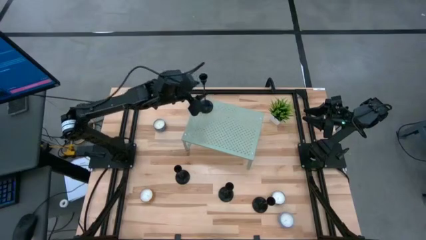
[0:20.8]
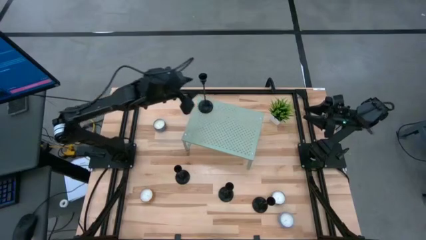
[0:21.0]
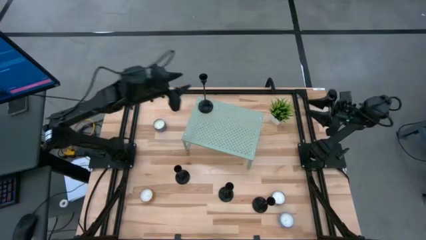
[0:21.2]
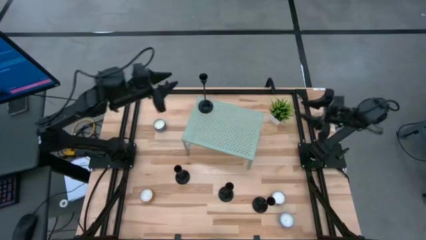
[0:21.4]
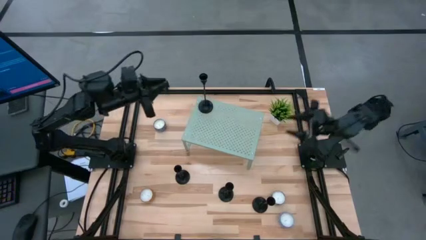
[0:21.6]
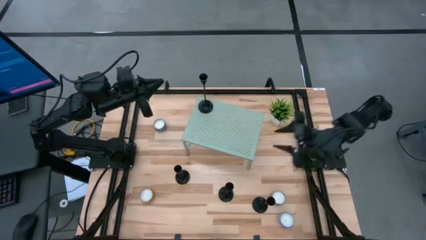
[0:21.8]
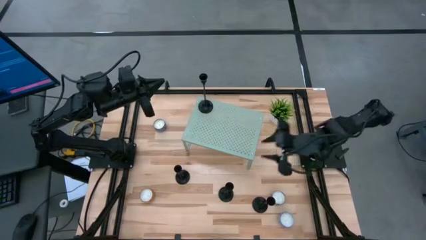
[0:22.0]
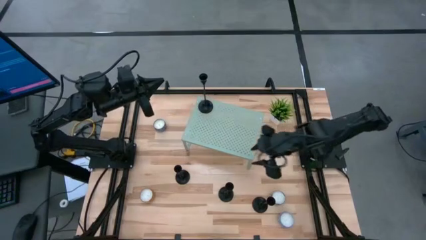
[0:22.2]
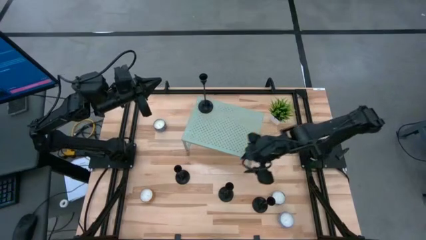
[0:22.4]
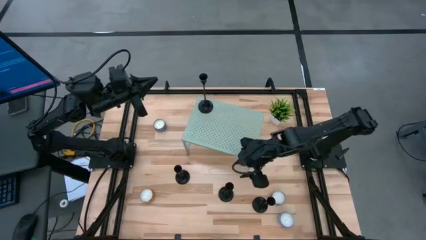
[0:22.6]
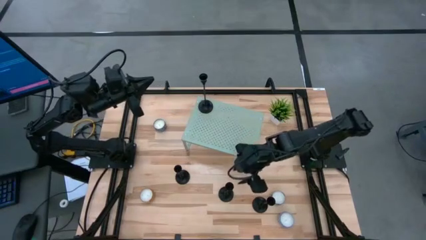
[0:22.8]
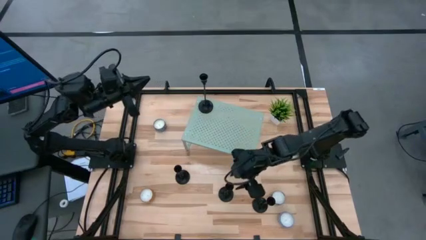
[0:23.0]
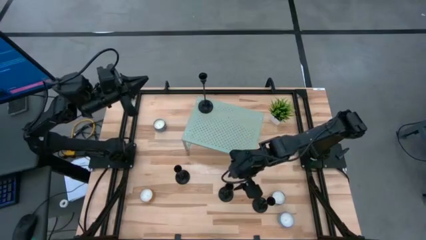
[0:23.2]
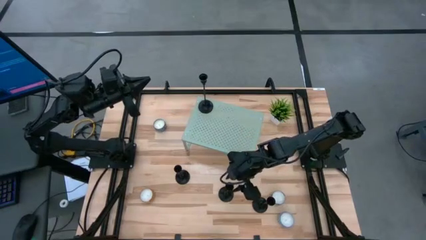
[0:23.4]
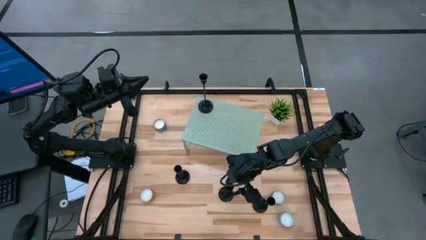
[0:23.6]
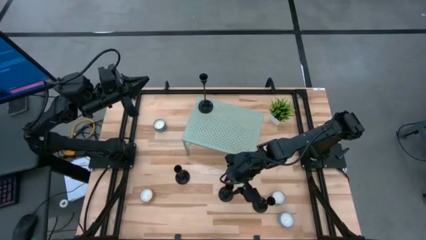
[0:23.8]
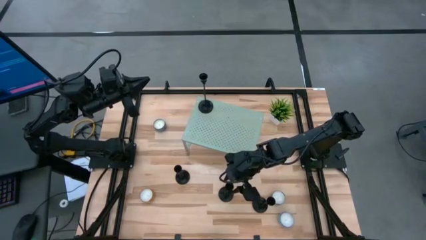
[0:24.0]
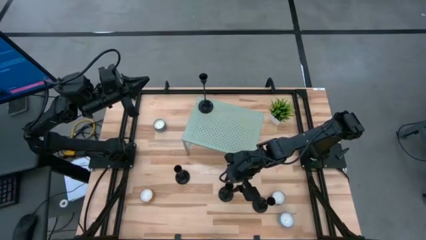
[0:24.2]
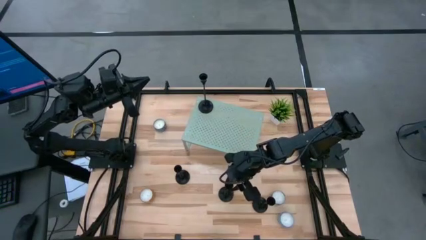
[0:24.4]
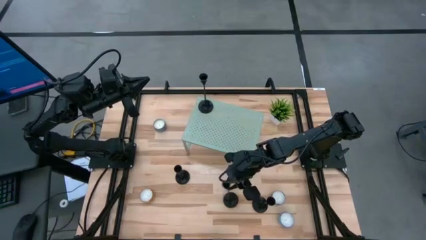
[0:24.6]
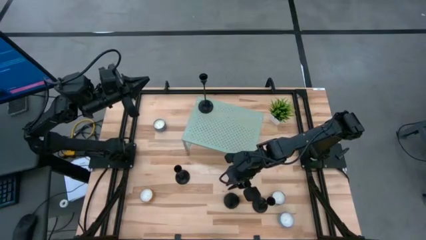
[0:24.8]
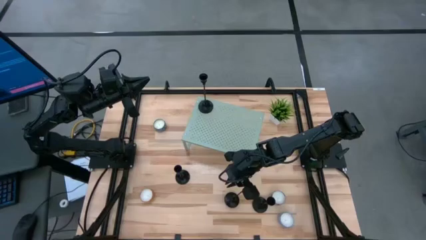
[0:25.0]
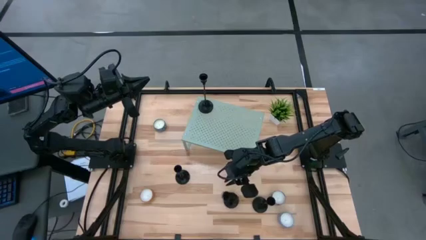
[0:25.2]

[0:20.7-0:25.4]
Task: Pick & Place candle stick holders
Put the black candle holder on the shelf

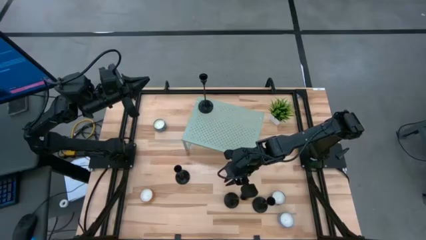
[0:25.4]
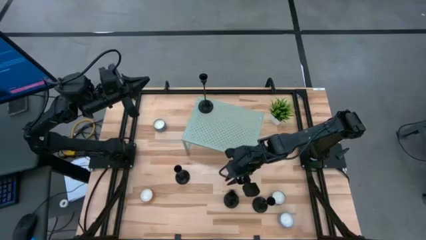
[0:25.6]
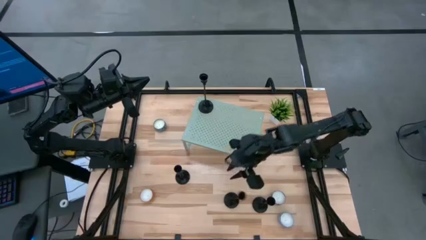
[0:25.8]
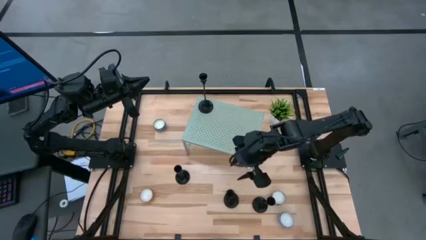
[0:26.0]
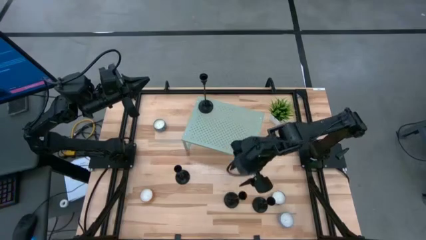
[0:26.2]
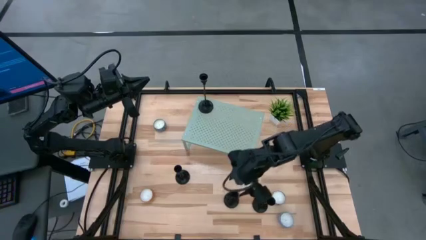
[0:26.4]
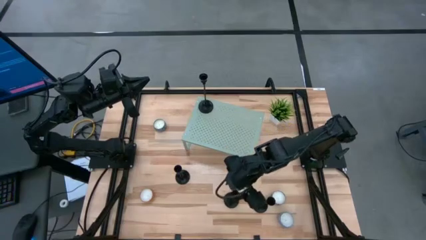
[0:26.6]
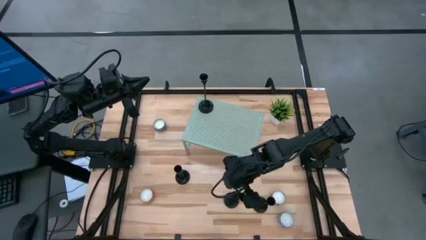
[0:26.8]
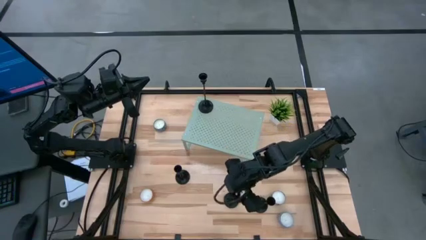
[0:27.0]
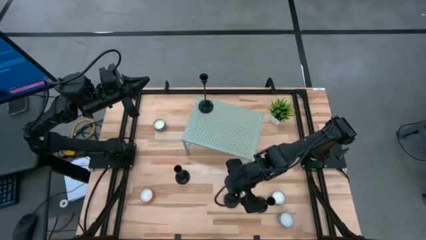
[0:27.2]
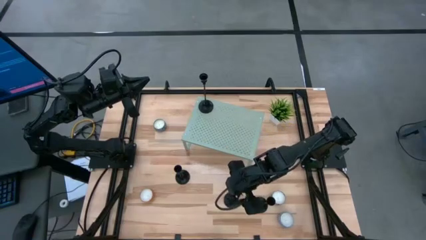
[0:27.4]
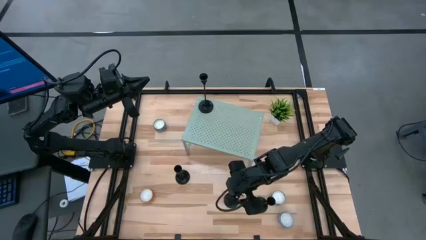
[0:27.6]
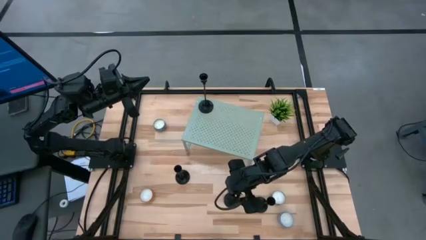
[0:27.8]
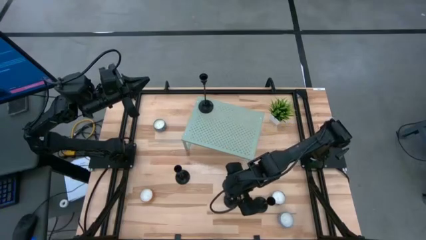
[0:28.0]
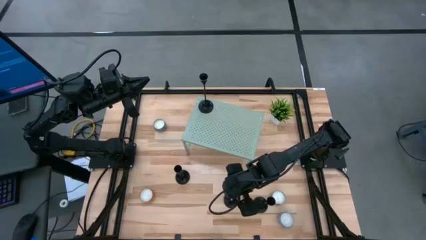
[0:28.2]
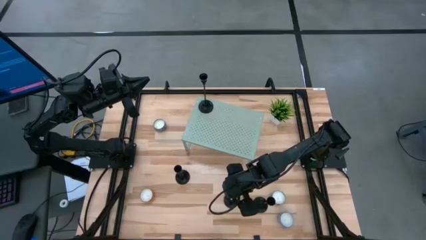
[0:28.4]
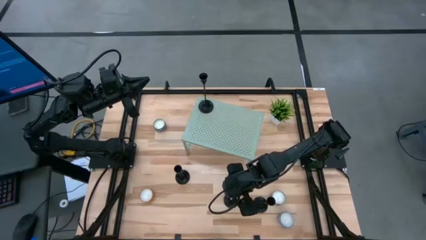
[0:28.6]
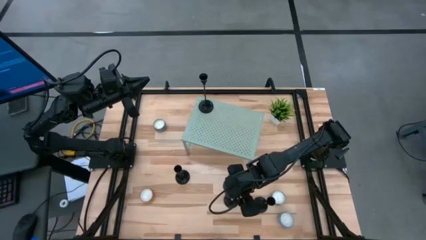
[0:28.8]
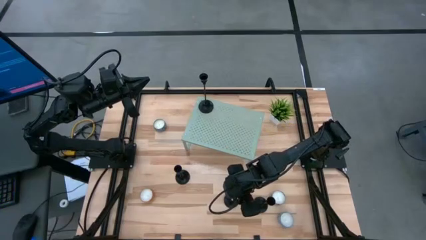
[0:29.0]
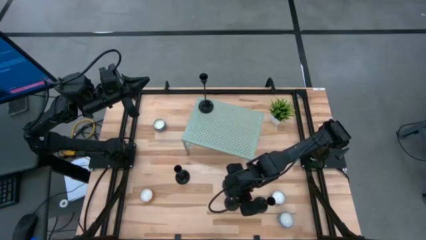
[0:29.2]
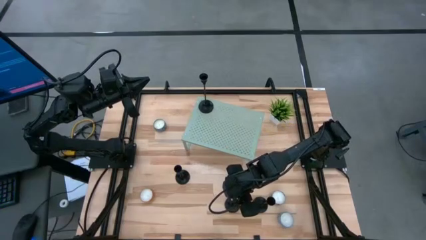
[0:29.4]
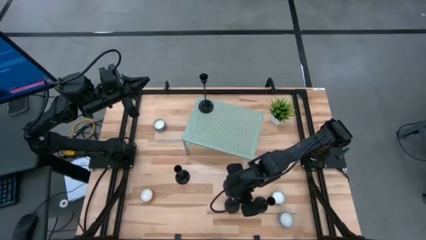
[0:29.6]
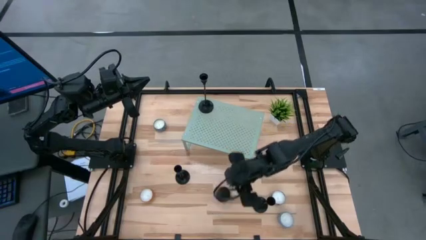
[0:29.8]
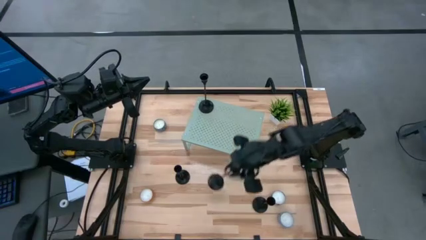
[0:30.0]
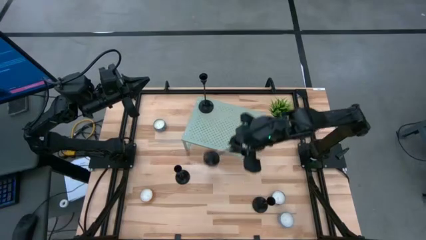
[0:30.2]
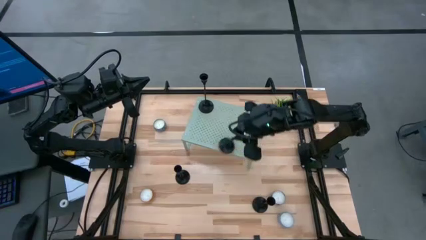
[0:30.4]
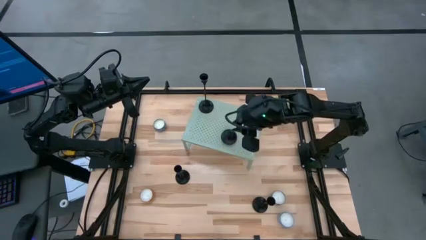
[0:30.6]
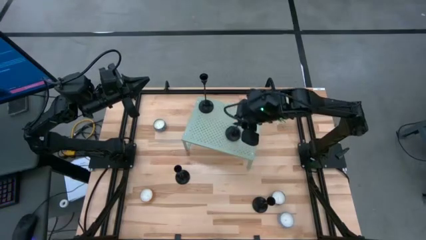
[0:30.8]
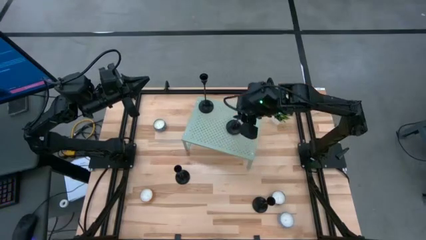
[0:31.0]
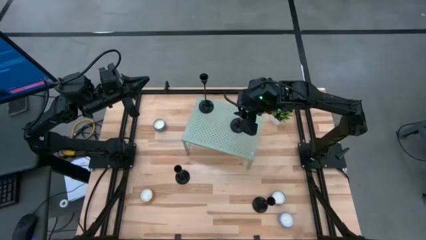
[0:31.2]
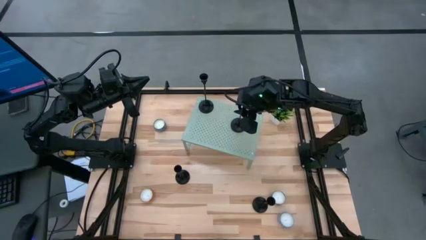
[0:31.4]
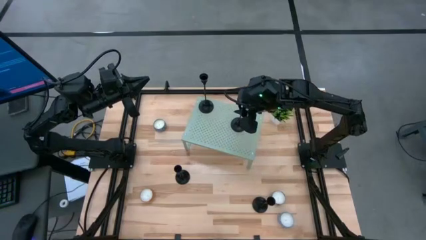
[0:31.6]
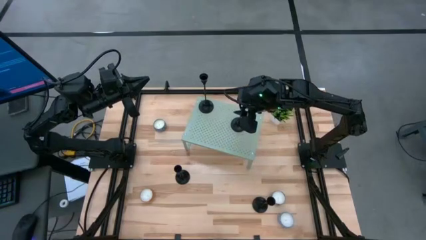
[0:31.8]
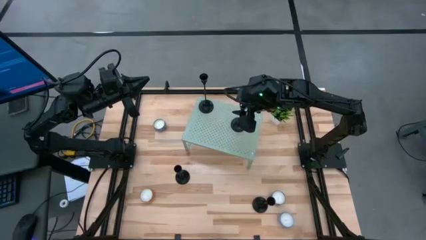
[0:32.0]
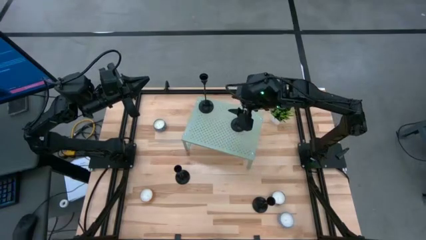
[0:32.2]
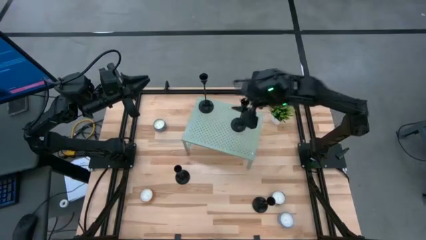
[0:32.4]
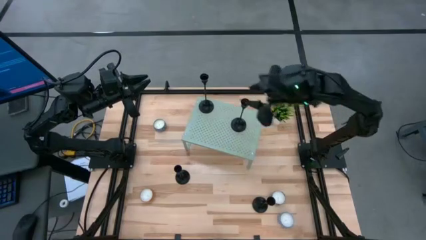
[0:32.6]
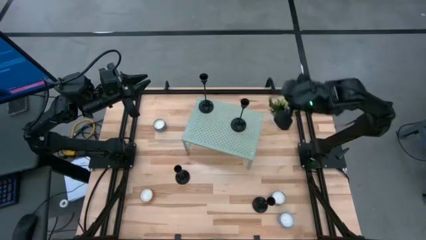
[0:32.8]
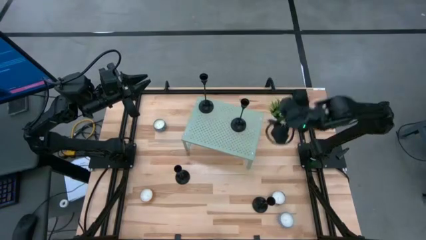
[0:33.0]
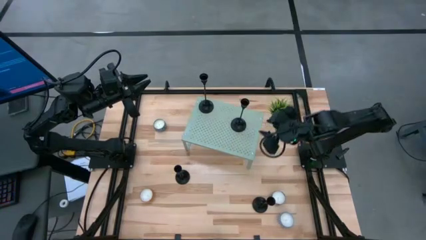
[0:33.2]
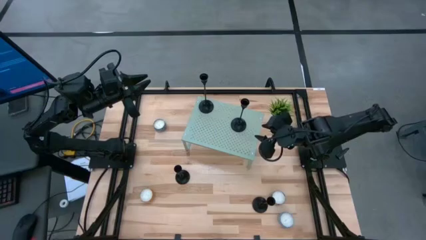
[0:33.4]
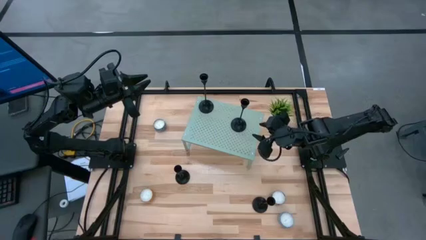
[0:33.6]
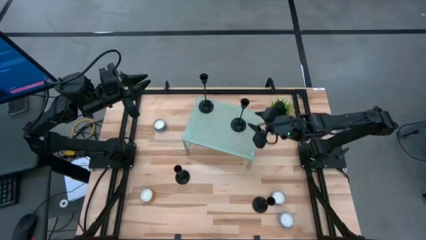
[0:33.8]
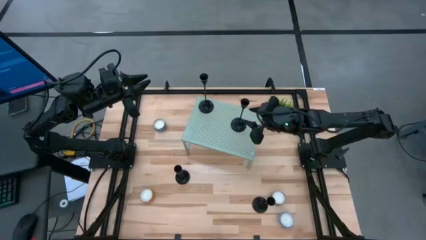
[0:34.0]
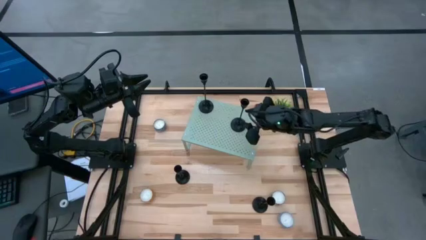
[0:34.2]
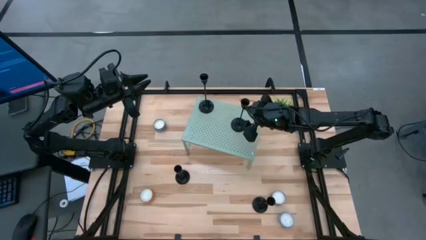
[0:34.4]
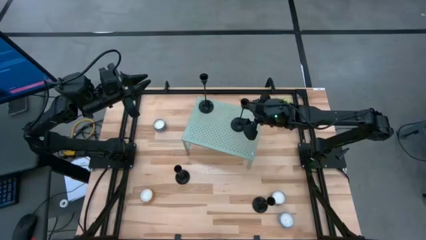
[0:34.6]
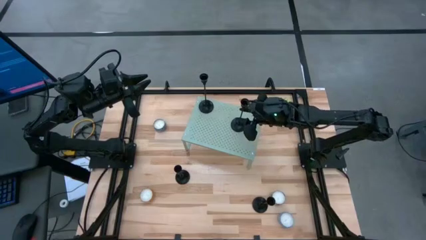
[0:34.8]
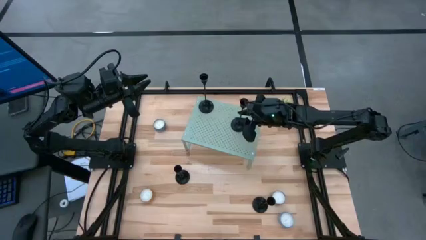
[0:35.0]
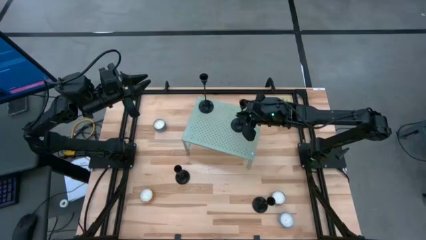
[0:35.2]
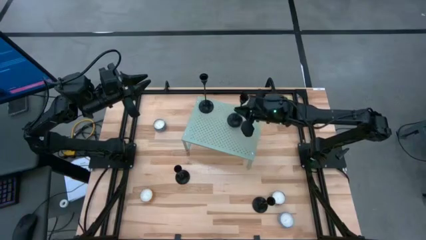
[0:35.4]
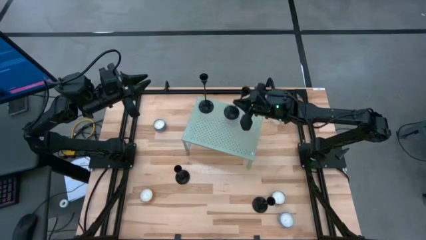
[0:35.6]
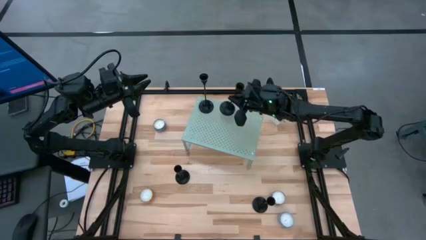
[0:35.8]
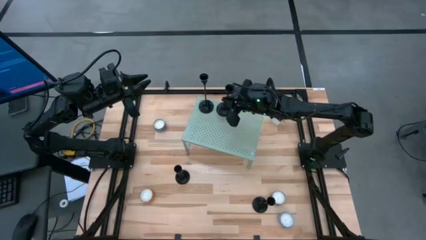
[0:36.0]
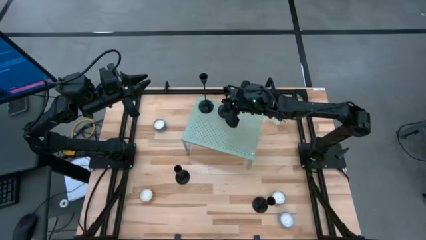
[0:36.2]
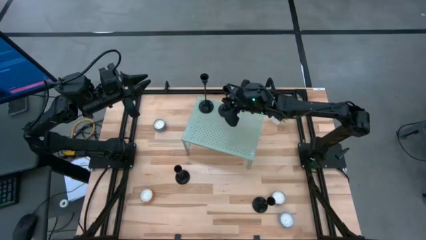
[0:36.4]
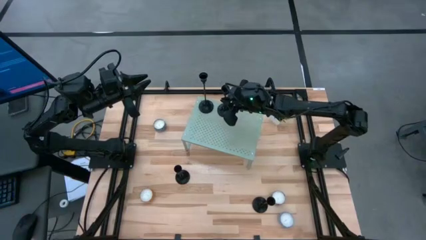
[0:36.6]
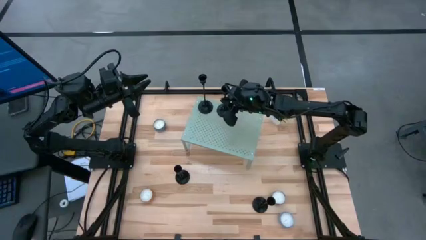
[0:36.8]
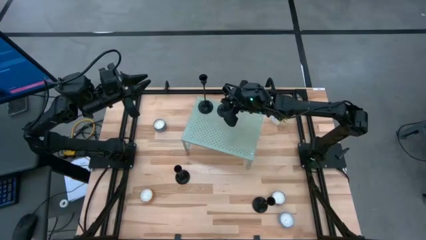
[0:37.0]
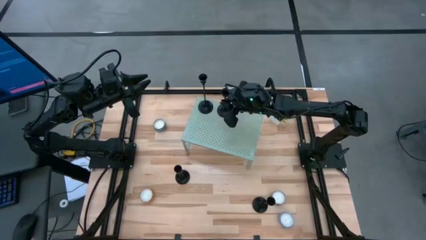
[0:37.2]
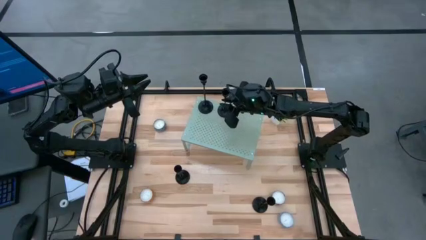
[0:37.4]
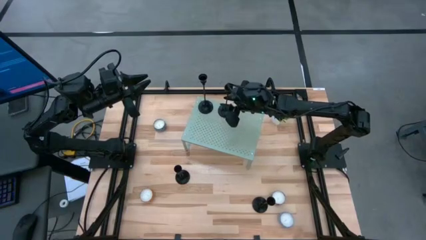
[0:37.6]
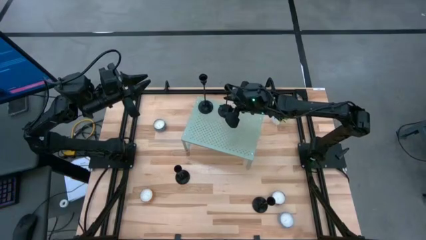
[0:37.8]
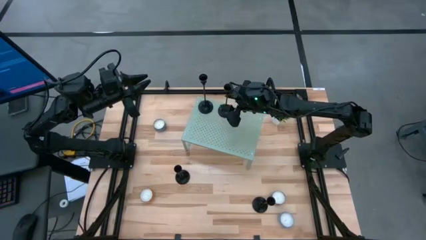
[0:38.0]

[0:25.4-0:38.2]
Put the black candle holder on the shelf
